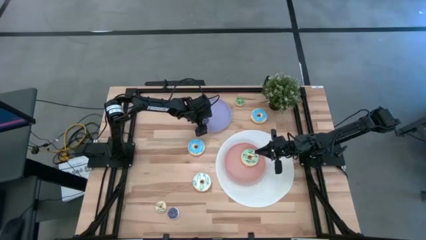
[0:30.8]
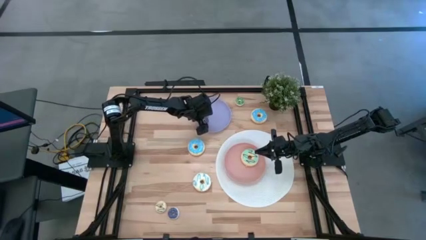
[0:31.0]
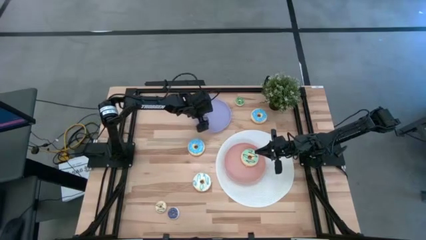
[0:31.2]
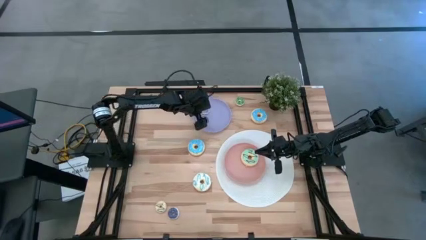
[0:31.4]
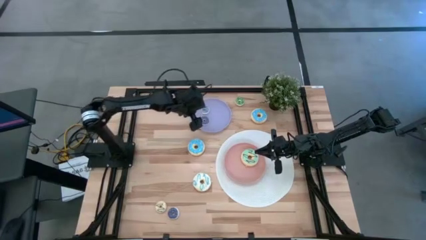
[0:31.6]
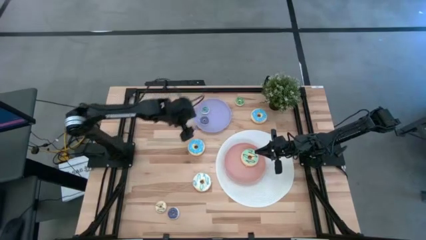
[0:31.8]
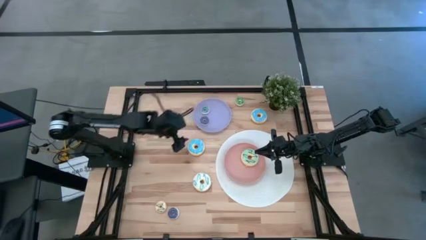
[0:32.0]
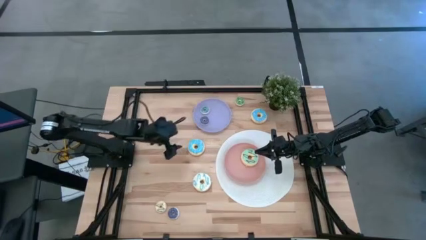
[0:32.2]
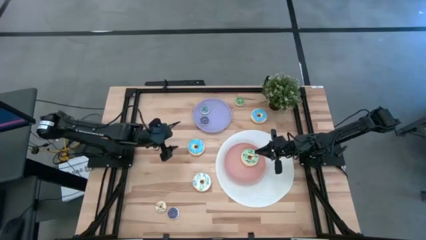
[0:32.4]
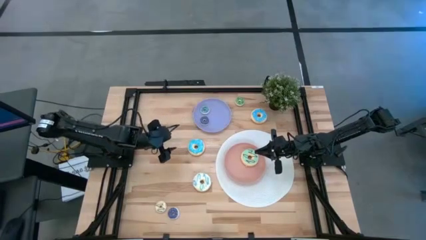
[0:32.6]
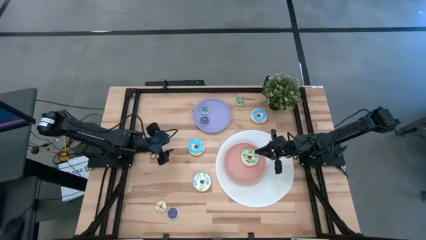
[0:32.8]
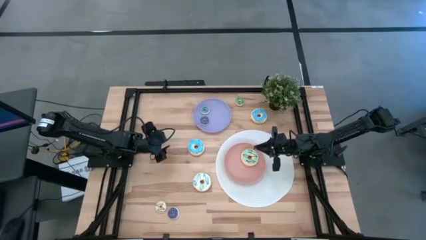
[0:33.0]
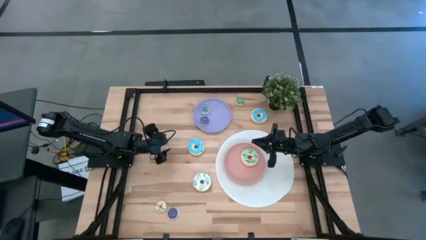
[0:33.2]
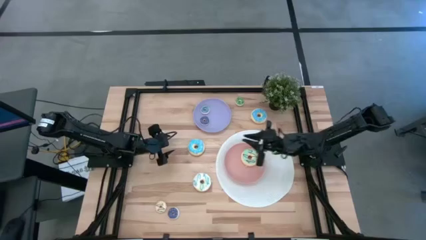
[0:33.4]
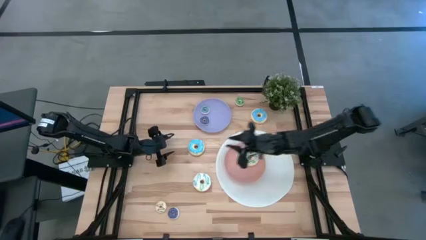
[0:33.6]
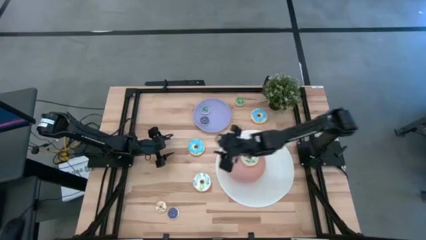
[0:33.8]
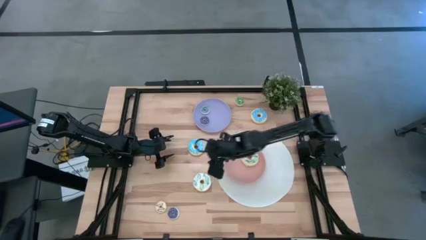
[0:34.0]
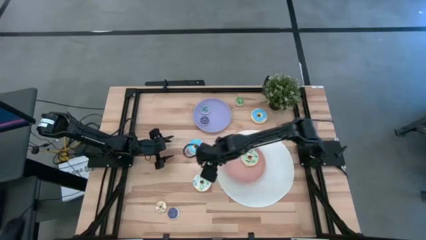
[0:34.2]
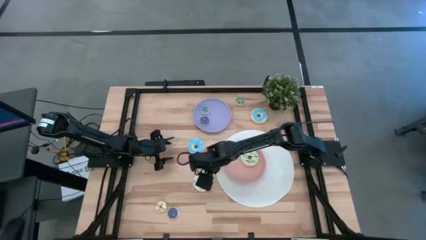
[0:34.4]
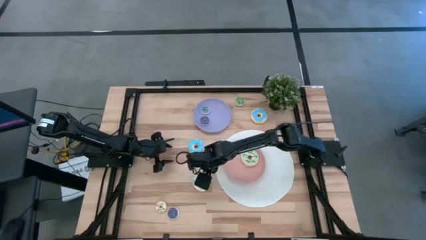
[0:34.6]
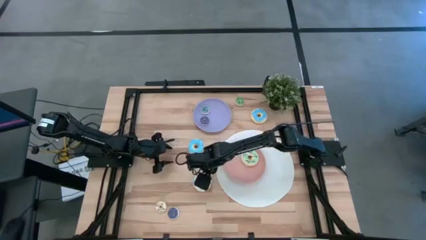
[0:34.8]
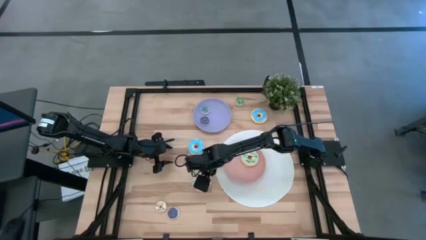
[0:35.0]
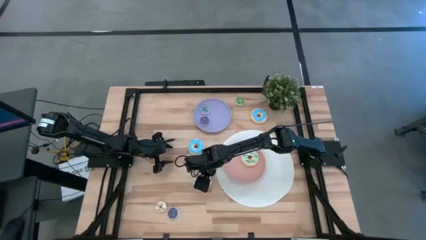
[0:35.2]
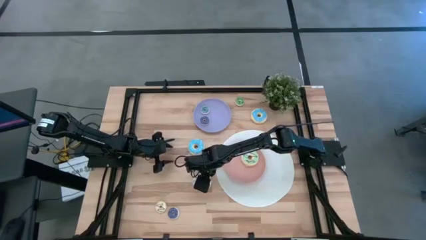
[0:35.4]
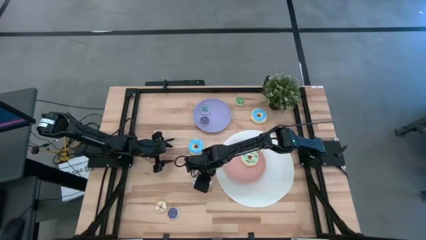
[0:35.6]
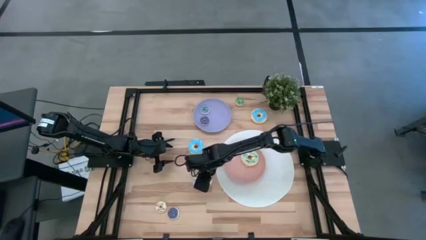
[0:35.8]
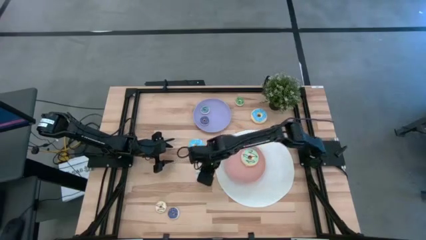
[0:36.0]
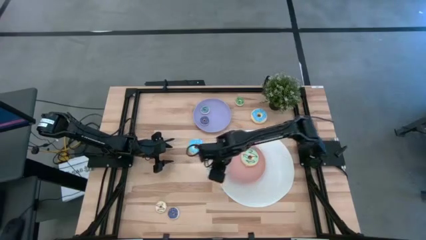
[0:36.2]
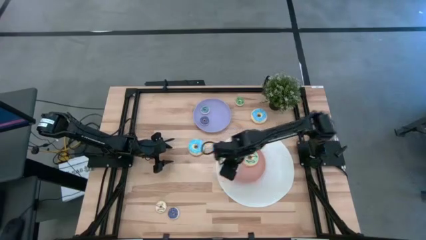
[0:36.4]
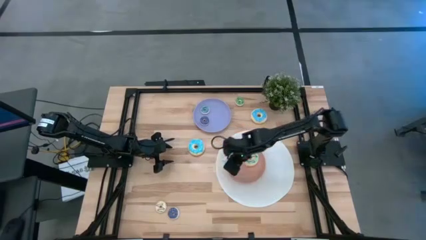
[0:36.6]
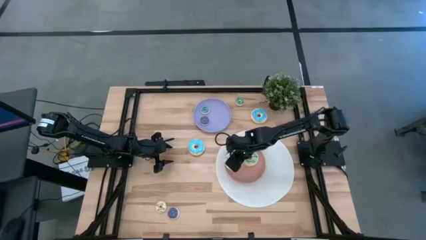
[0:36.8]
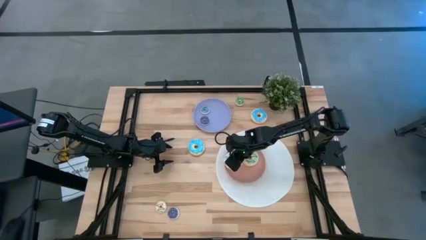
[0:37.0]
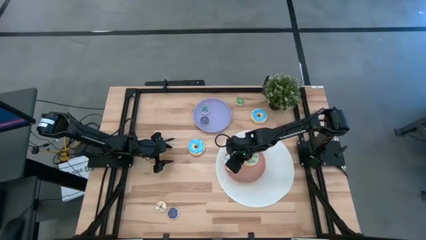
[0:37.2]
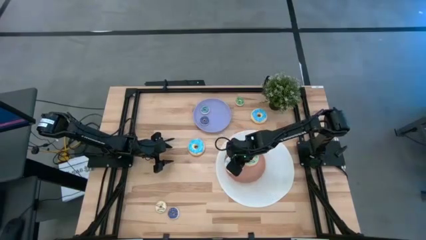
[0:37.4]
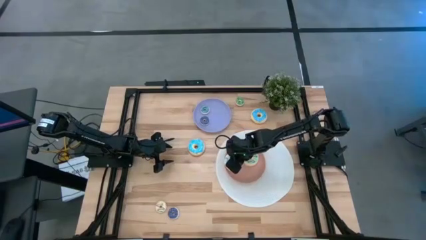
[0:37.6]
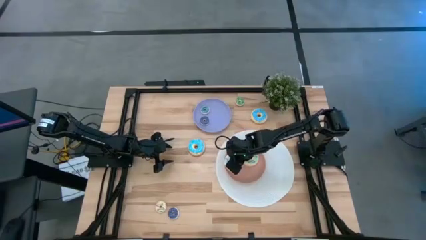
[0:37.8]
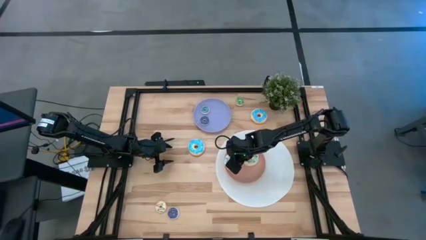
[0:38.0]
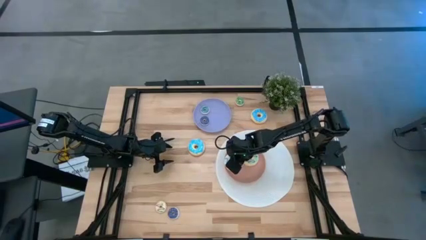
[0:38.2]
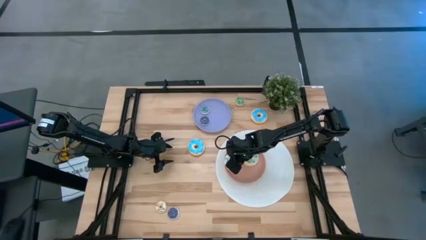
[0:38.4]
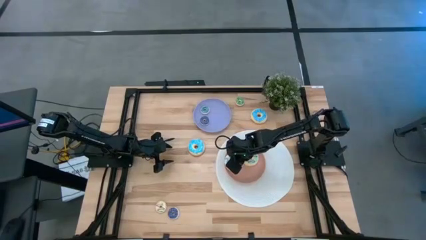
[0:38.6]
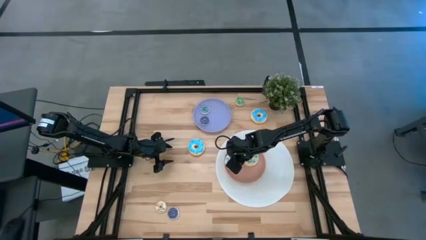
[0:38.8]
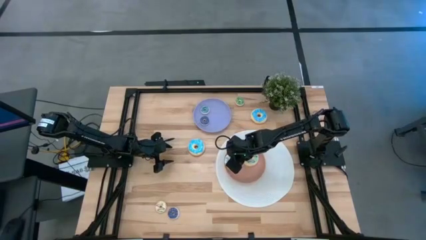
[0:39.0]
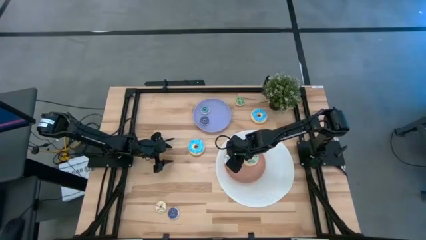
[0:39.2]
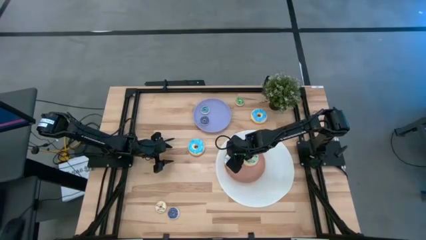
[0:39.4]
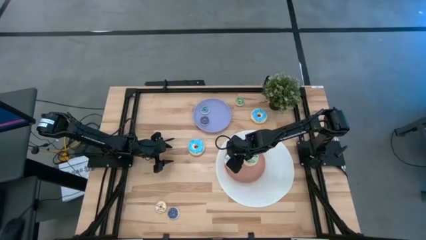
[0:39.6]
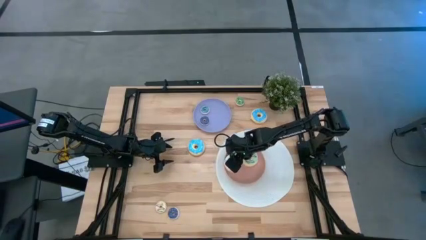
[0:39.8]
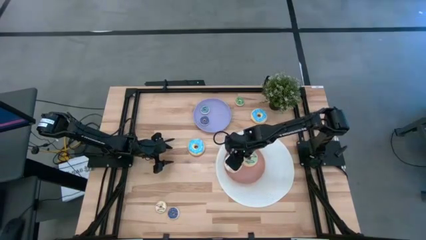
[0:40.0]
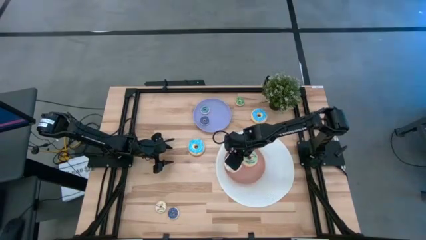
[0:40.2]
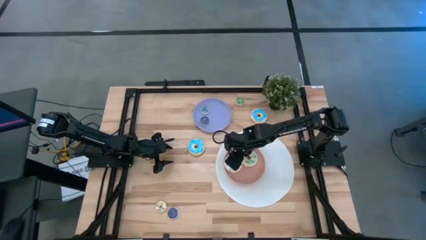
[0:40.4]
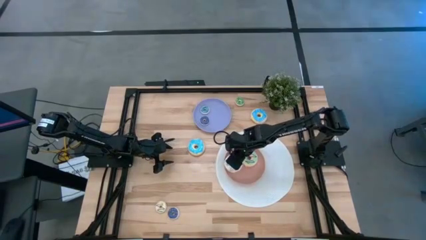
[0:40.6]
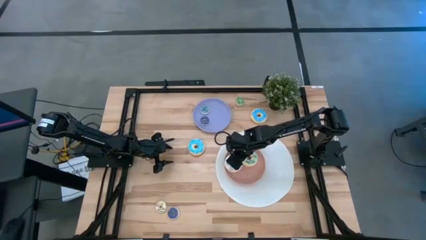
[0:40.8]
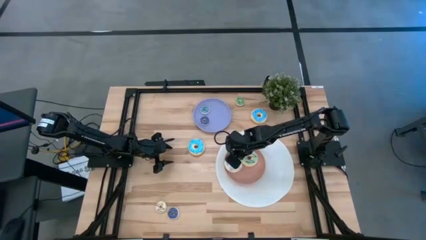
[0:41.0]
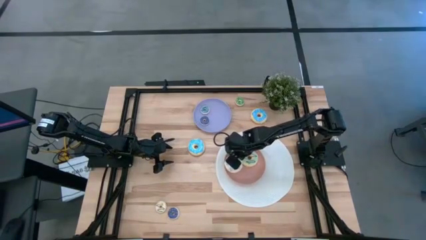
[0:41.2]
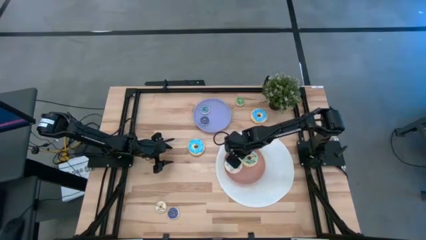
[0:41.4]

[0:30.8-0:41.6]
Task: Pick & Place donuts
Put the big white donut on the orange plate

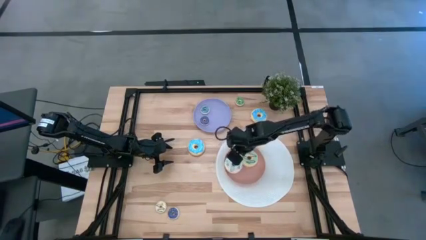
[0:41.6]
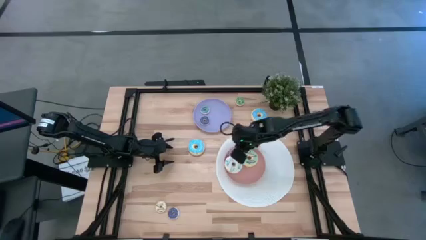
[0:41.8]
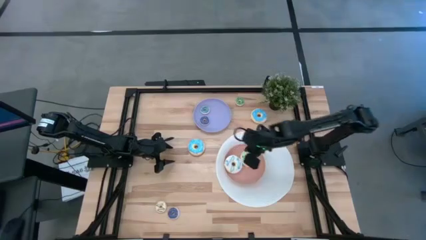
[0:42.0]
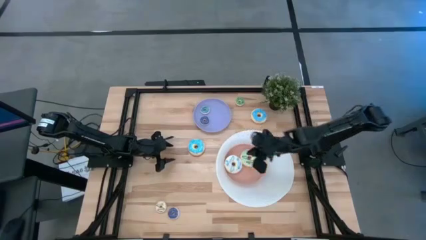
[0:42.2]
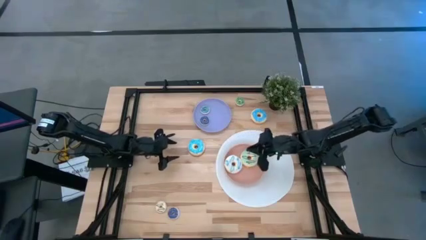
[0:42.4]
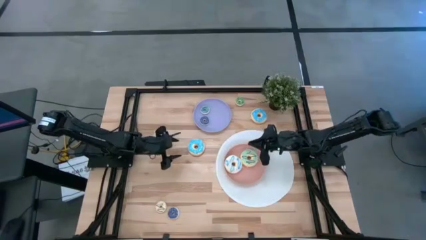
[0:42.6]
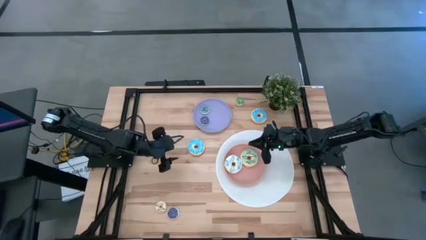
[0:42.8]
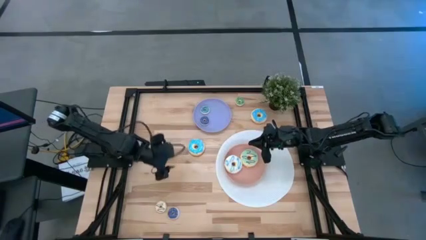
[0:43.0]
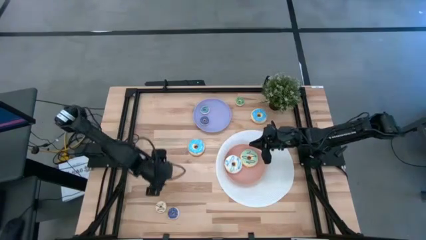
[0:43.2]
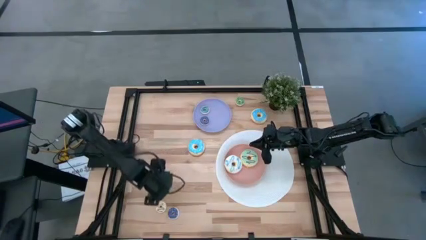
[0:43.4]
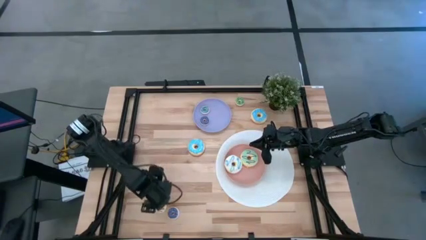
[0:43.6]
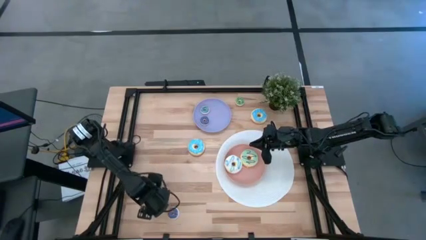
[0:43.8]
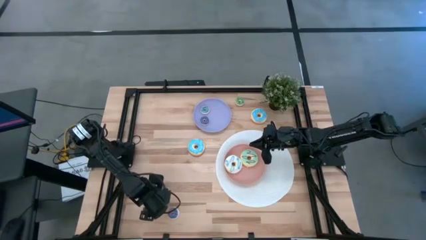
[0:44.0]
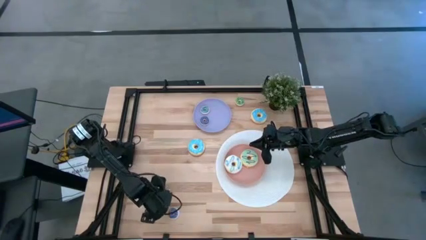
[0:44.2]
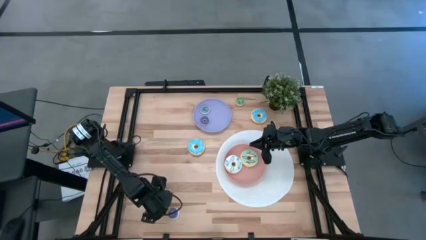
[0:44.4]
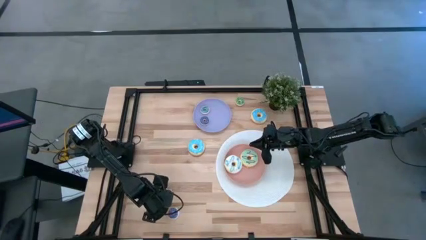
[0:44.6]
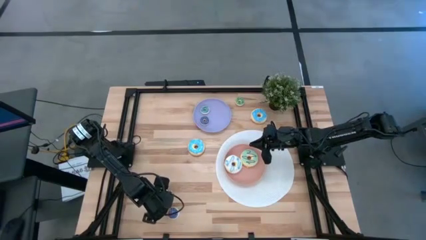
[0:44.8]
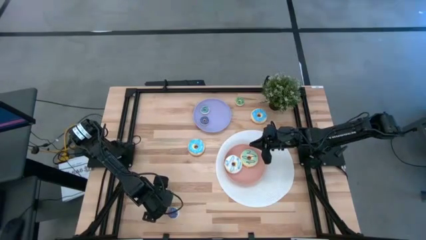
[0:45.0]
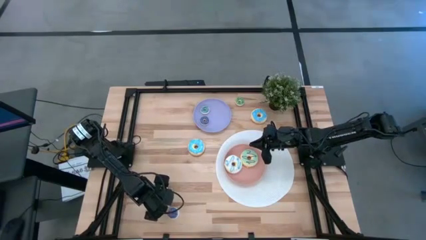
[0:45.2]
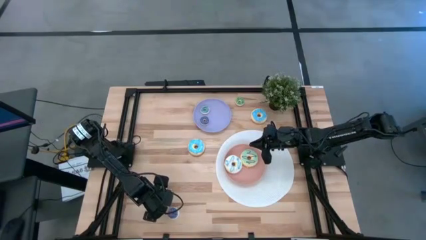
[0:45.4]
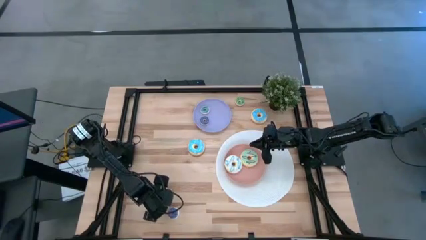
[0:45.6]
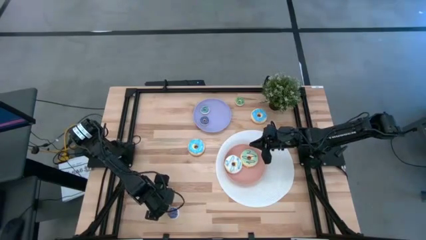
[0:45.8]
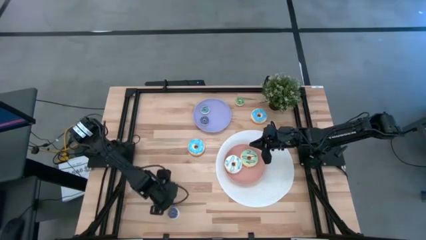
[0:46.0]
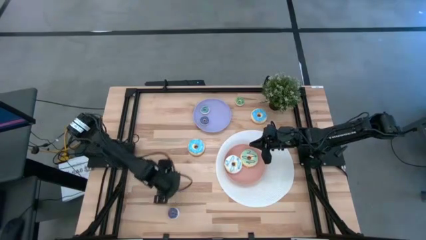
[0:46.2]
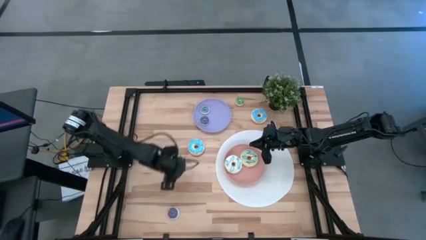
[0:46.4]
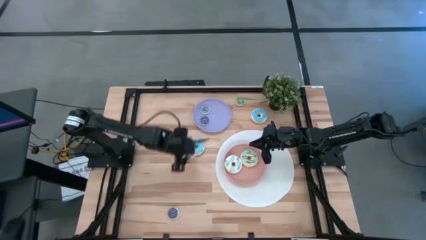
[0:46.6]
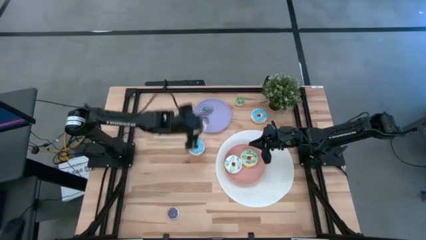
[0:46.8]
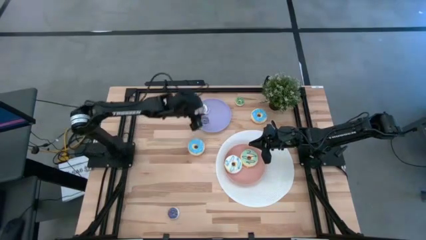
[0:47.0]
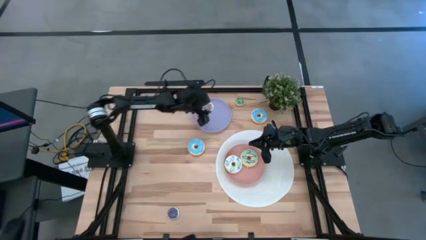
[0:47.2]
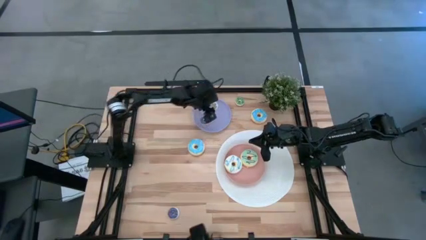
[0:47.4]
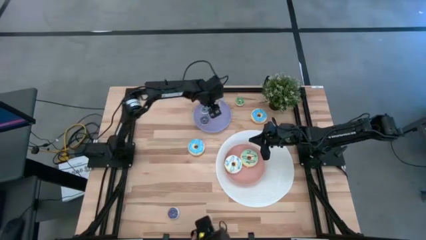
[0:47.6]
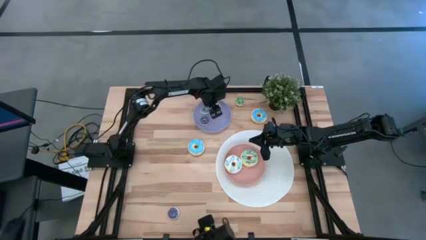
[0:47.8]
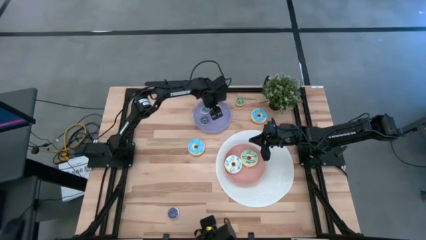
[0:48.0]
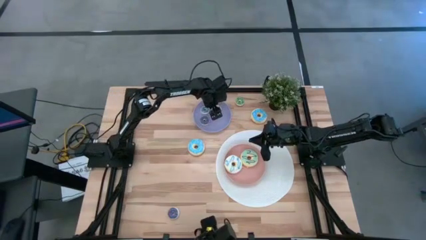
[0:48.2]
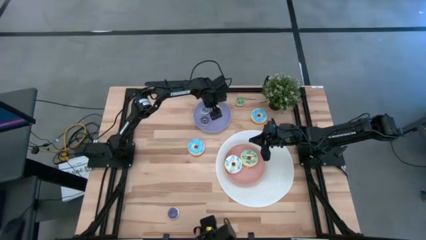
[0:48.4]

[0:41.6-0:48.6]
Put the small white donut on the violet plate
